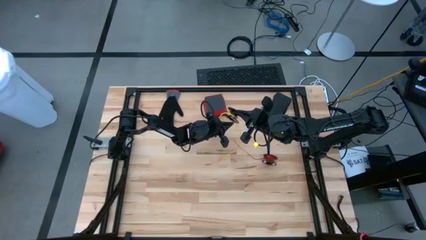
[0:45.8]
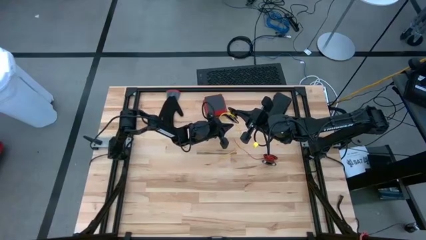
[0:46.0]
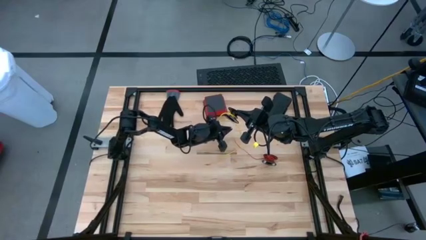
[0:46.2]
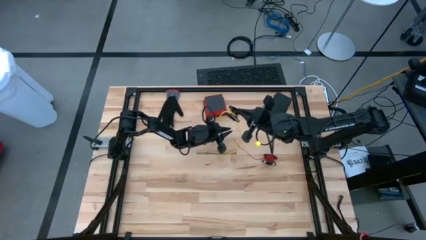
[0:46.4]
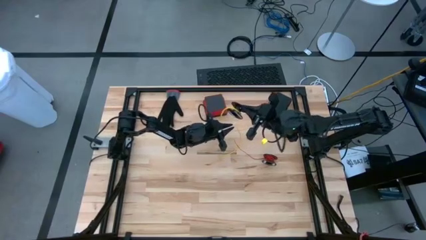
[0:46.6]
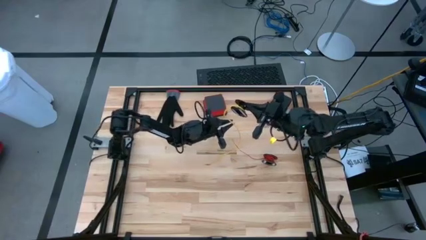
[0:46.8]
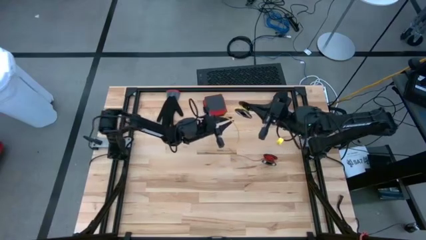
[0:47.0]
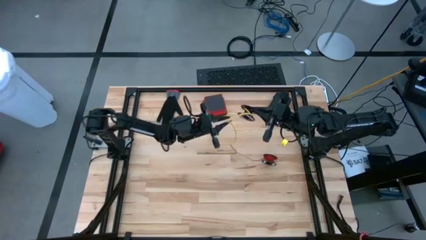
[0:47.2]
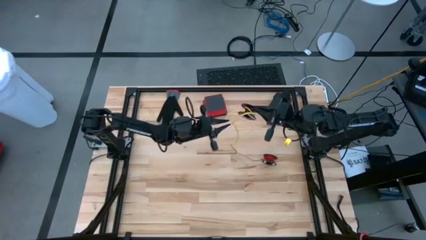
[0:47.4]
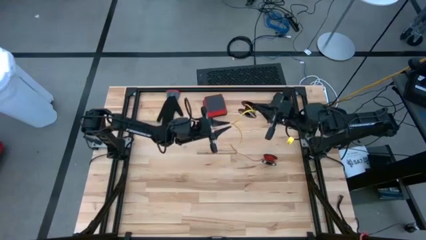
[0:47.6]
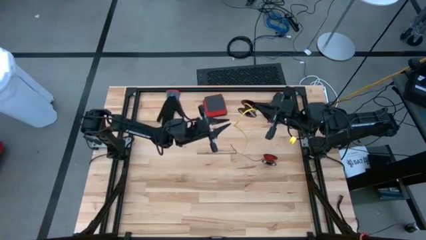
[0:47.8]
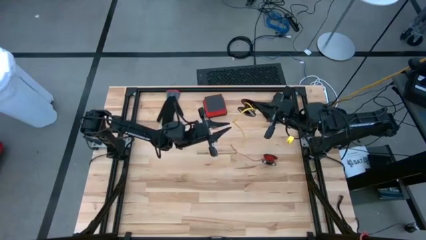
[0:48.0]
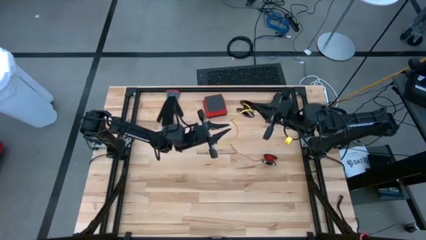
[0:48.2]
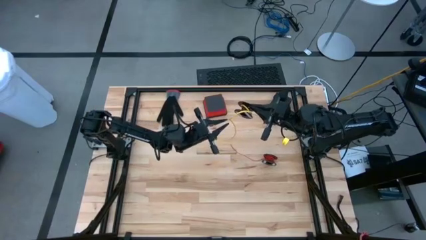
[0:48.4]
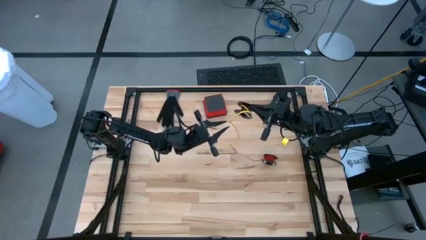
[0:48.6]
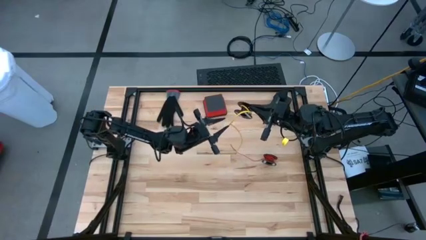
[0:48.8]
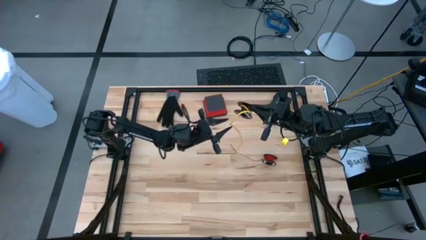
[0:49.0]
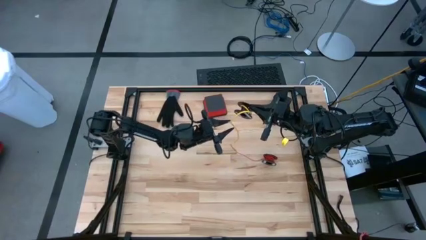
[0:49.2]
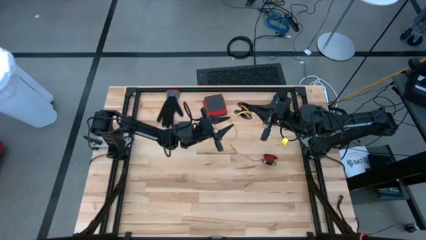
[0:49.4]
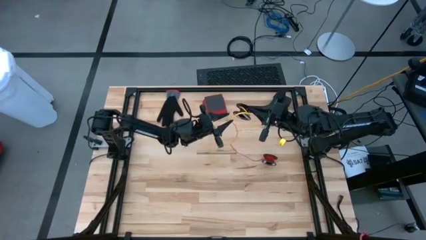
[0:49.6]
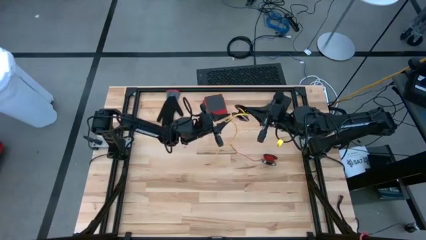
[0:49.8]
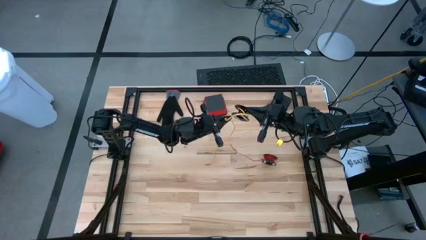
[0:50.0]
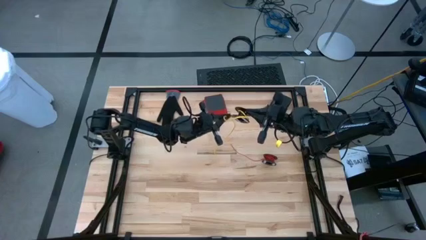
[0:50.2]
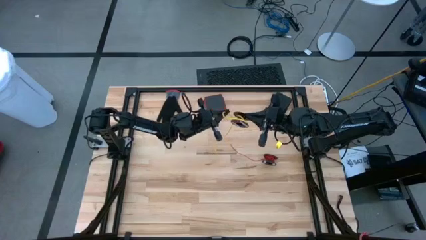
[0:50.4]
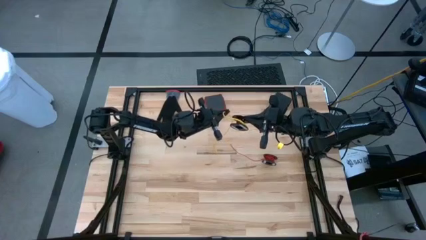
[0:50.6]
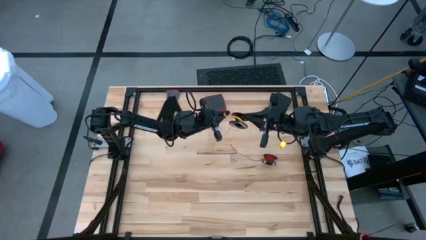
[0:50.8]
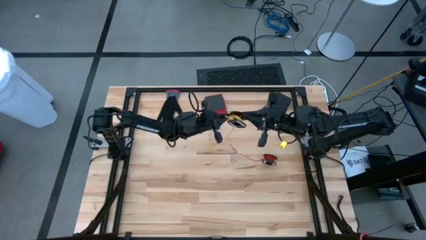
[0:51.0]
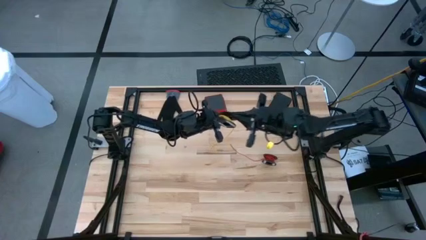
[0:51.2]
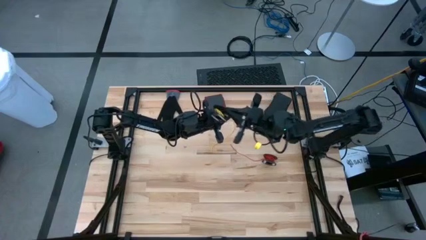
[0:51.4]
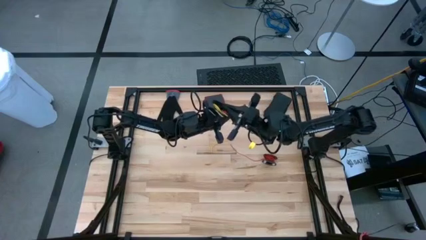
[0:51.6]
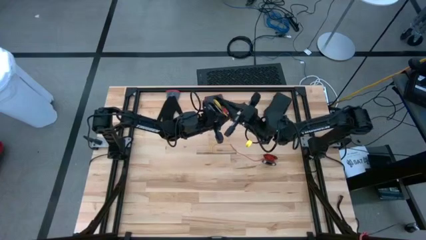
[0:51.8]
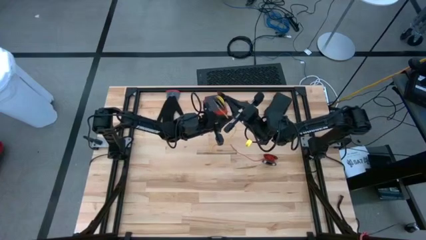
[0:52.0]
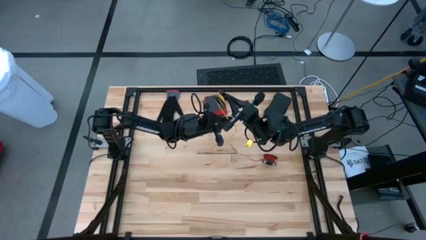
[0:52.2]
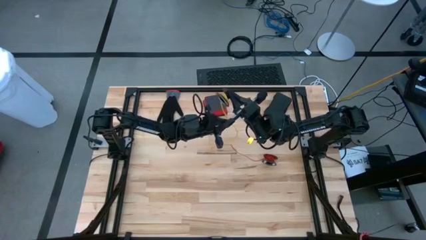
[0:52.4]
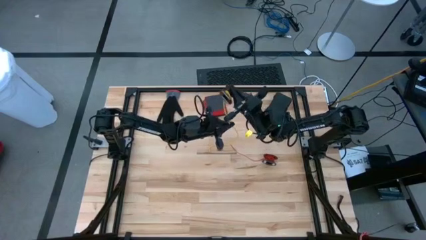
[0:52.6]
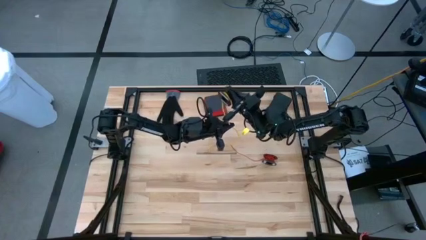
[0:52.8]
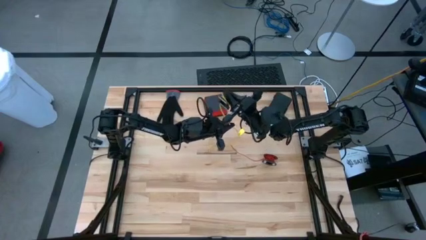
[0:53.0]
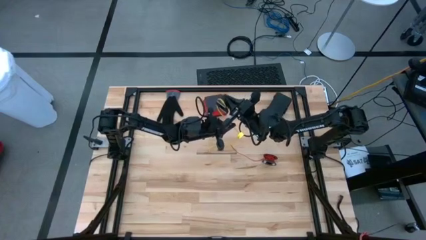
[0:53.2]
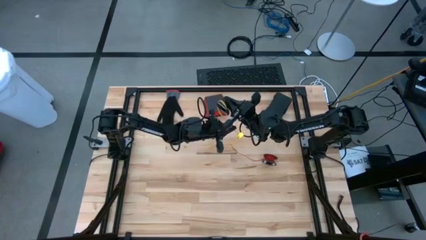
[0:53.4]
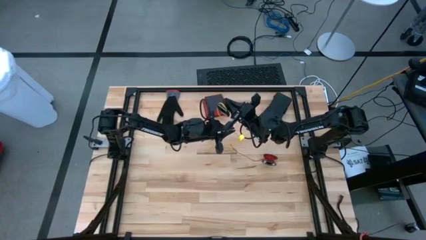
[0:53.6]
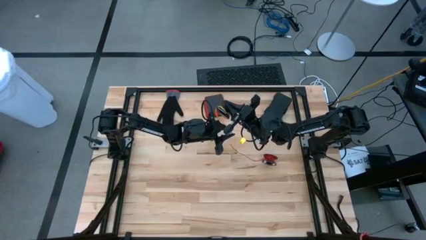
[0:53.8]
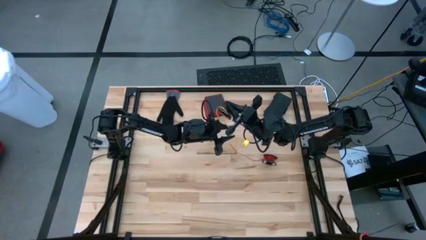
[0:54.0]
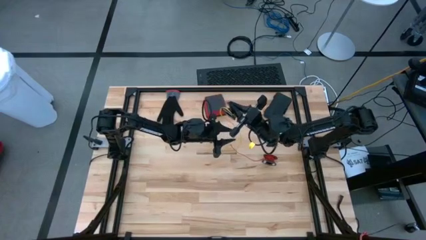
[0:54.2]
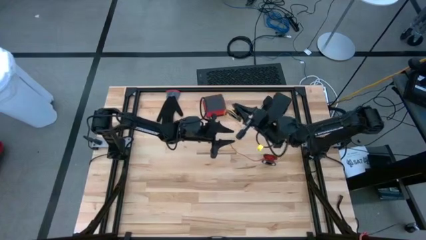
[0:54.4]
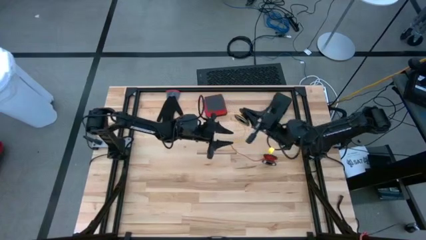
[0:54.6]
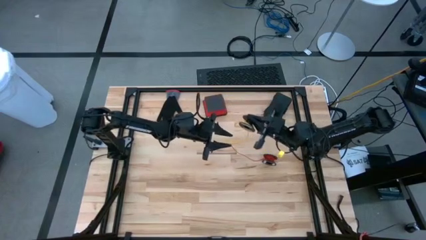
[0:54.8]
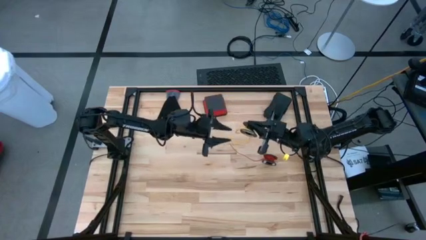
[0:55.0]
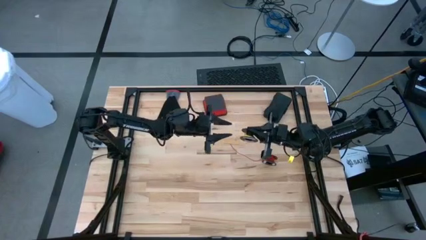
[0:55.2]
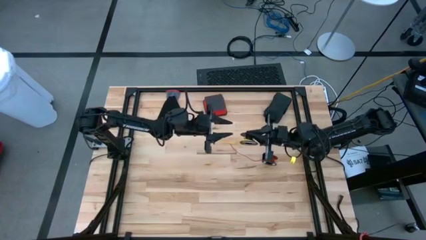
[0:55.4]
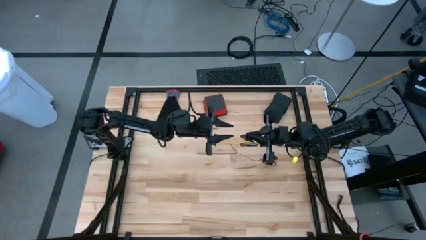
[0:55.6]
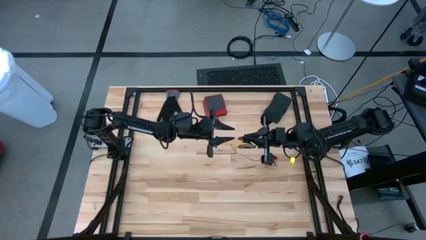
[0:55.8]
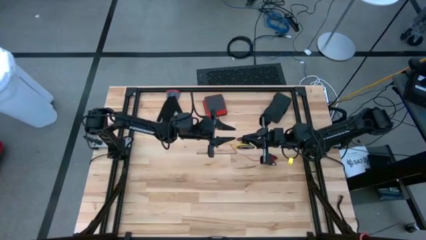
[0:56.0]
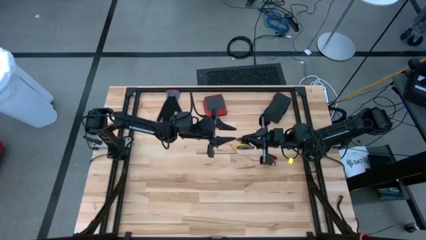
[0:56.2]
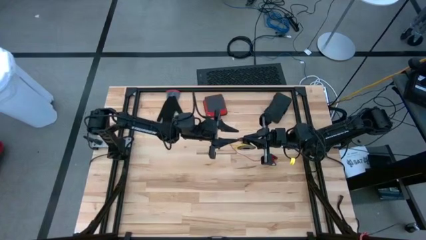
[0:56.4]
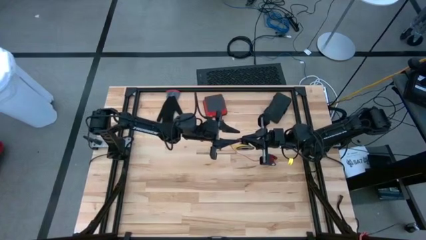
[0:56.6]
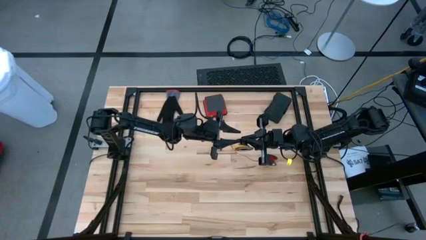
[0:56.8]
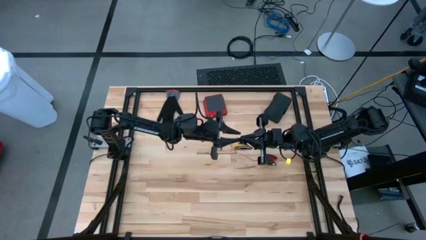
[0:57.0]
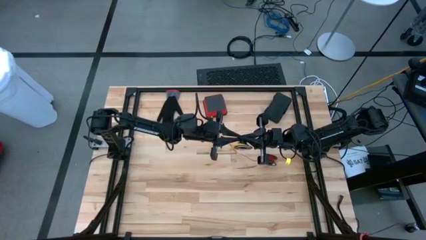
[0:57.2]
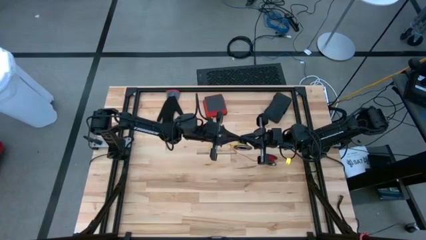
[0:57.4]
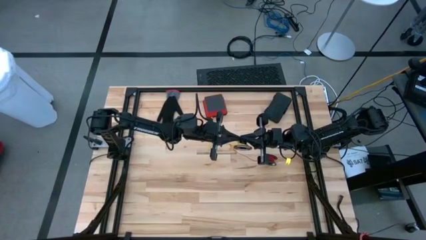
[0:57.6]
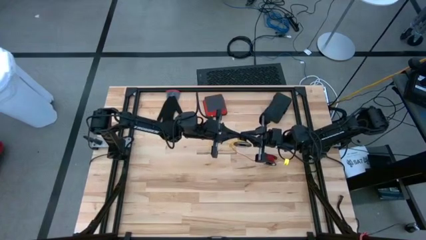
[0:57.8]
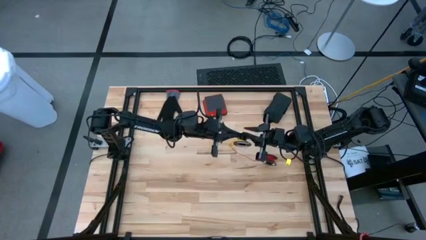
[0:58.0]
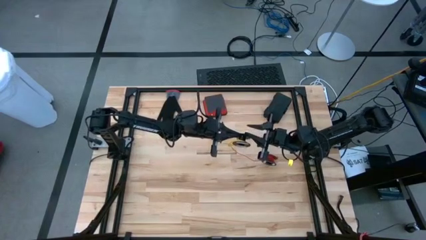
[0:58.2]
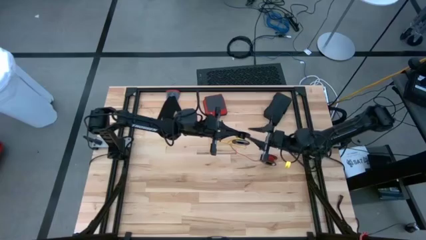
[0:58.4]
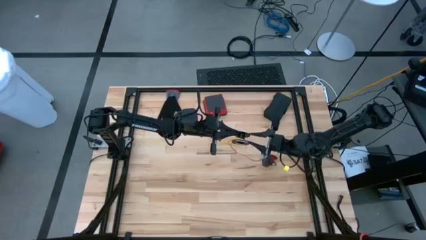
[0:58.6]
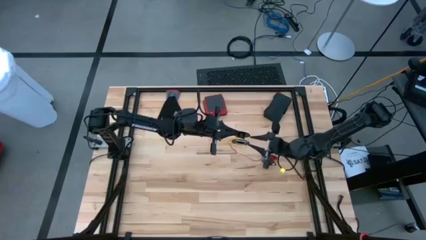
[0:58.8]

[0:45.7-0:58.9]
Task: Coil cords
Coil the yellow wire onto the spool

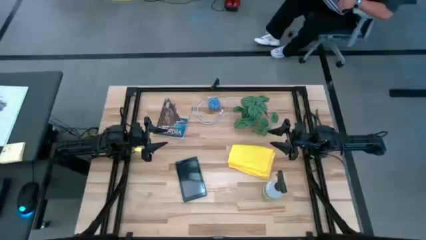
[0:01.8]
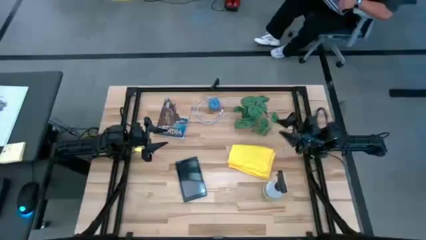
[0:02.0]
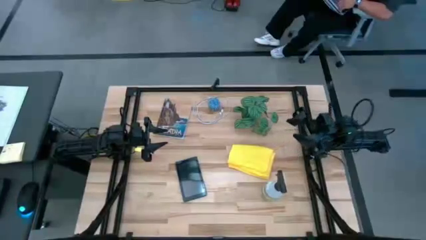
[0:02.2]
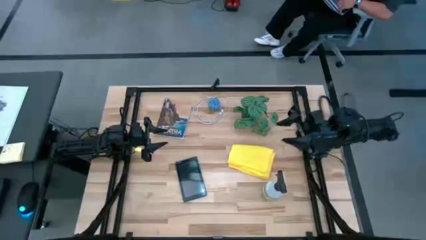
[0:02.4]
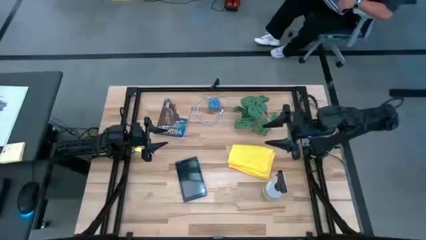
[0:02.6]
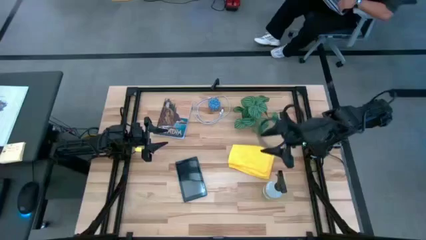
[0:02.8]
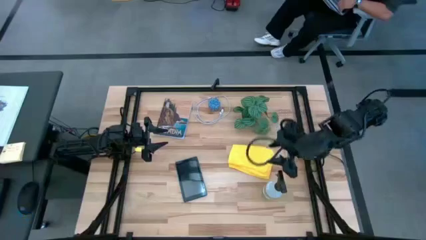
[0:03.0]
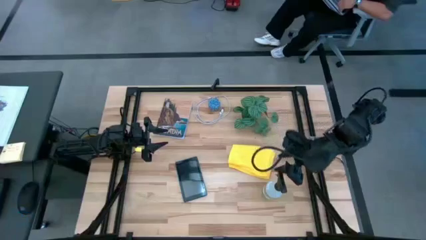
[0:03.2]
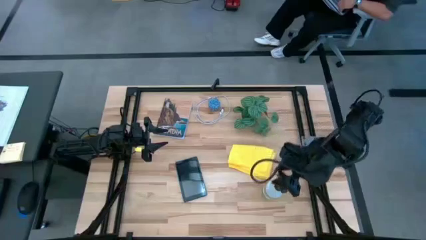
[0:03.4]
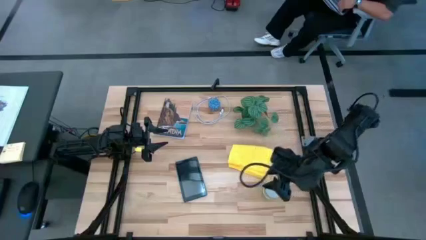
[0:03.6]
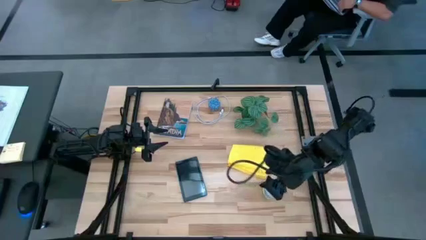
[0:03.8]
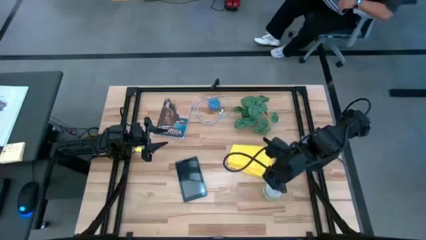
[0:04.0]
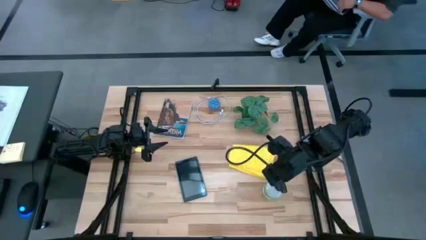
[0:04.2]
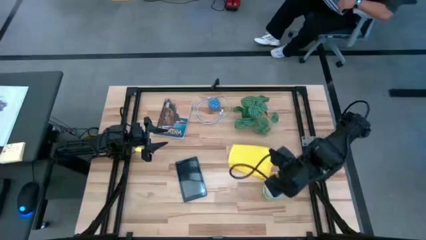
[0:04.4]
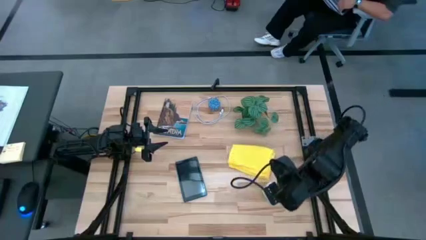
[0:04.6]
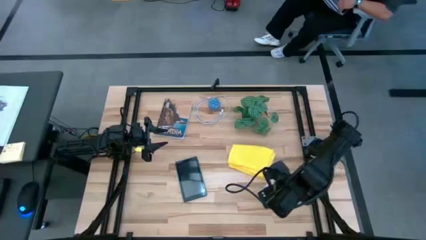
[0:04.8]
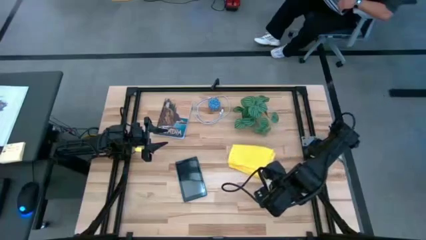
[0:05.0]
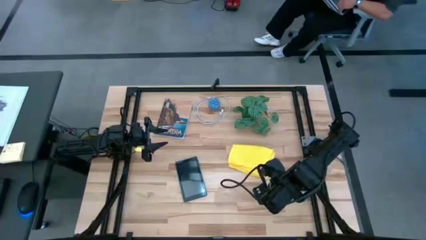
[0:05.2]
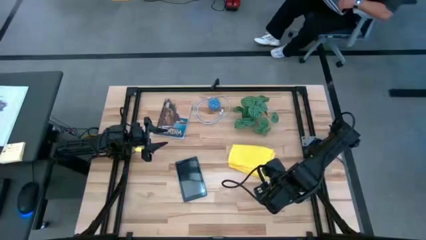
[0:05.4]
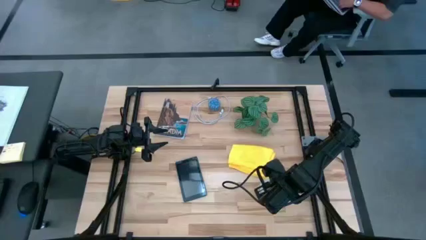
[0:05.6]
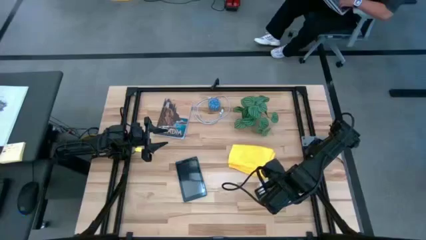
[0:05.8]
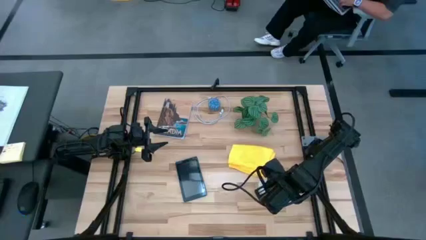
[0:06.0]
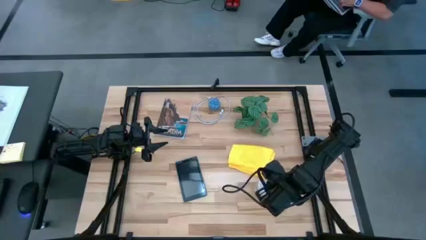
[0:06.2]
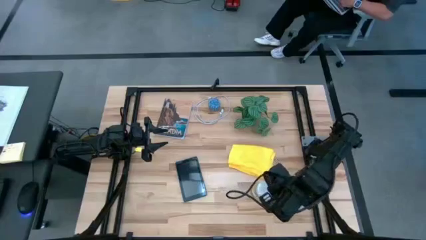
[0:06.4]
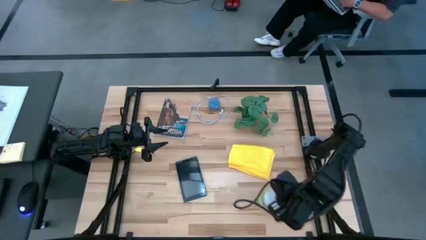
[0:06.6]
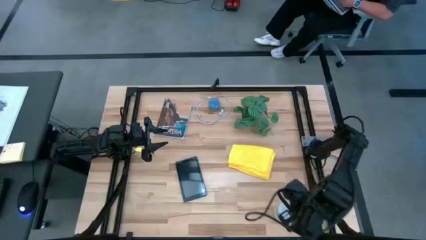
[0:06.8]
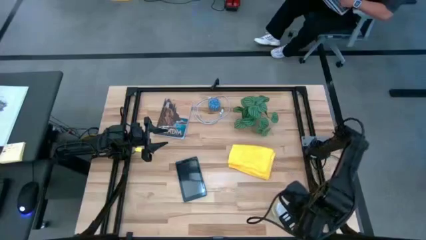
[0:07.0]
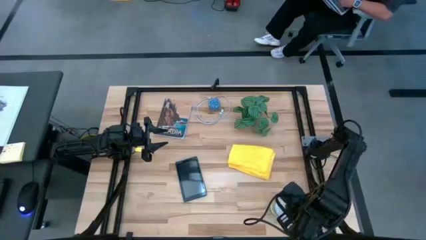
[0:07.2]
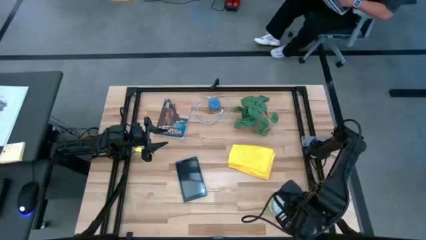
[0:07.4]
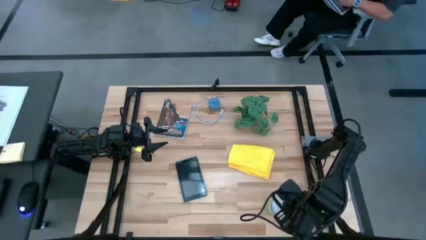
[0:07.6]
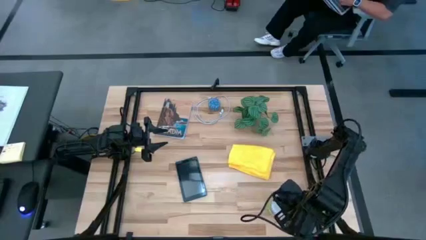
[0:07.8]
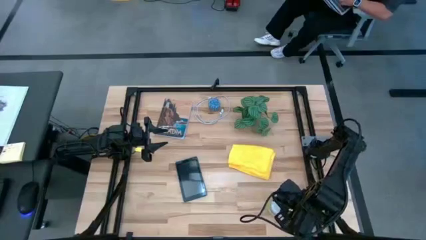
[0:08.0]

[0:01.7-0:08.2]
Task: Clean tablet
Move the cleaning bottle to the bottom right of the table
